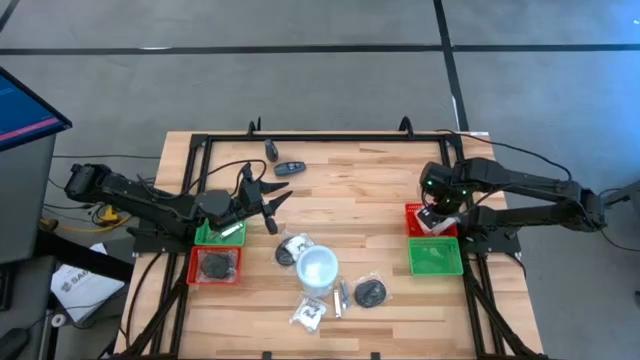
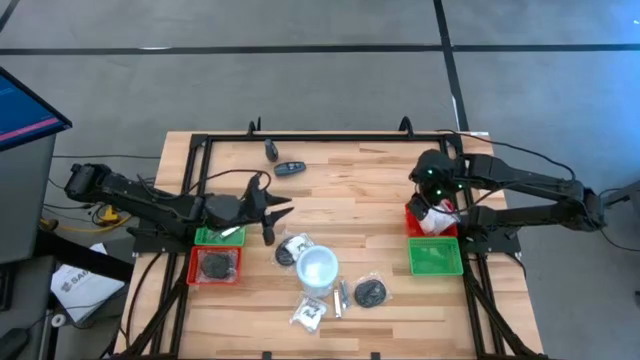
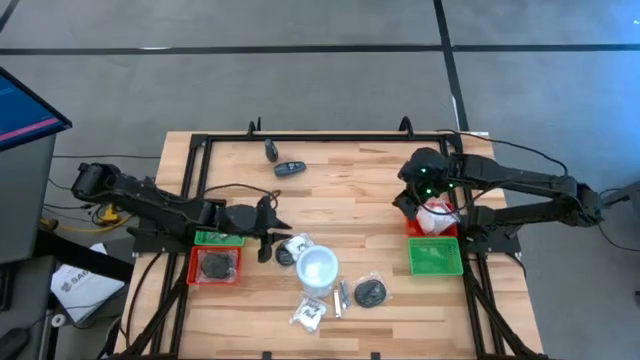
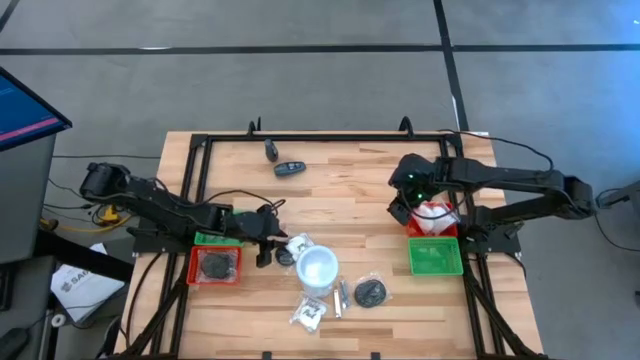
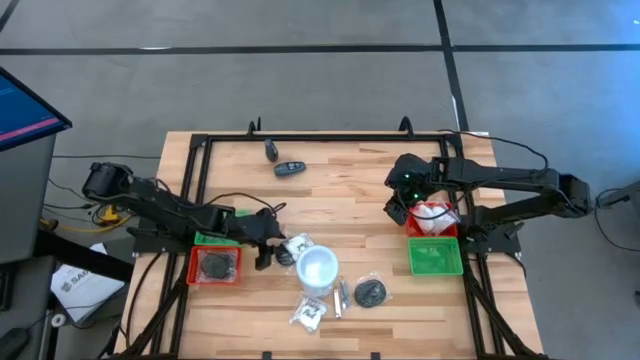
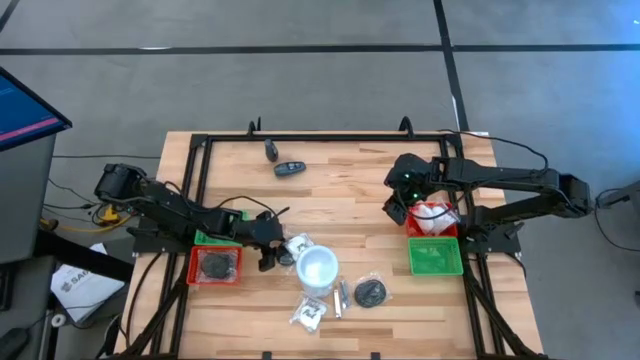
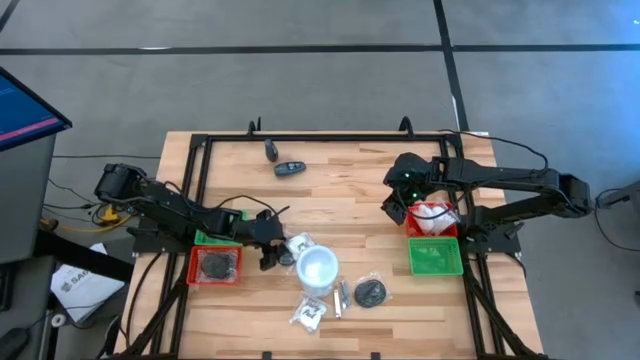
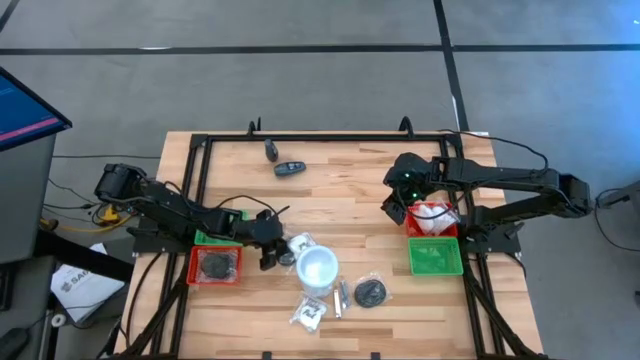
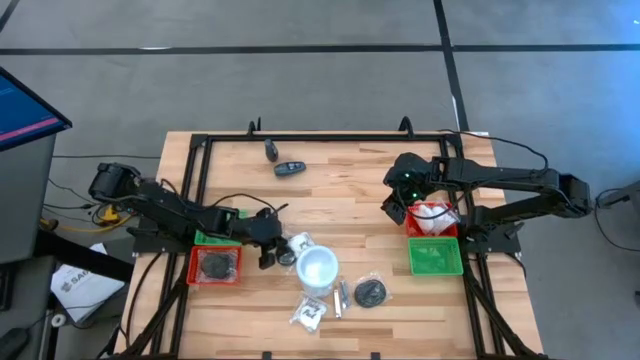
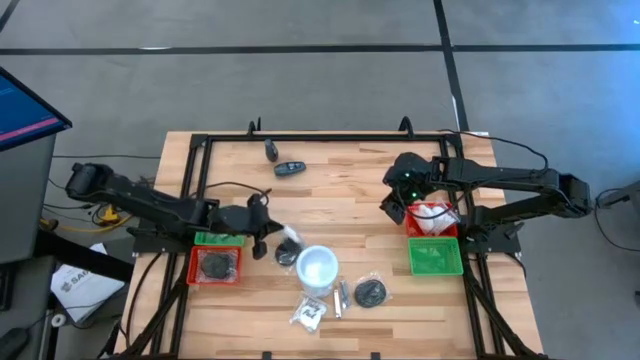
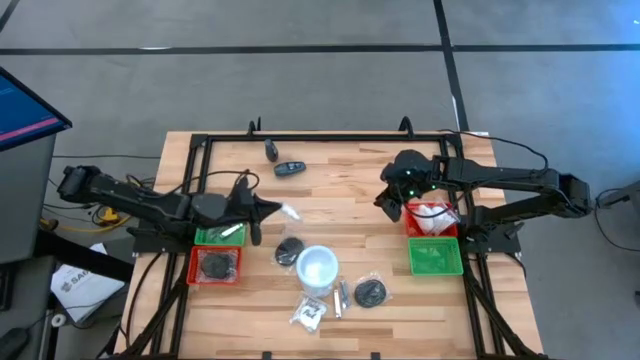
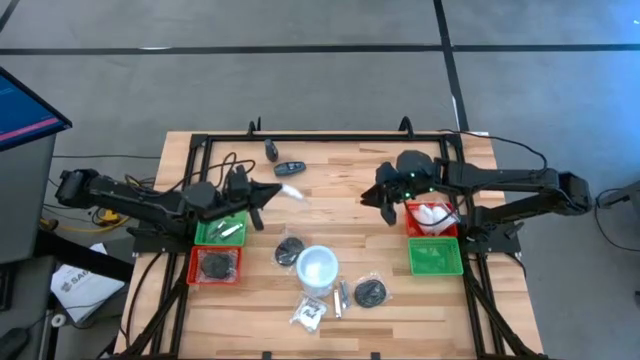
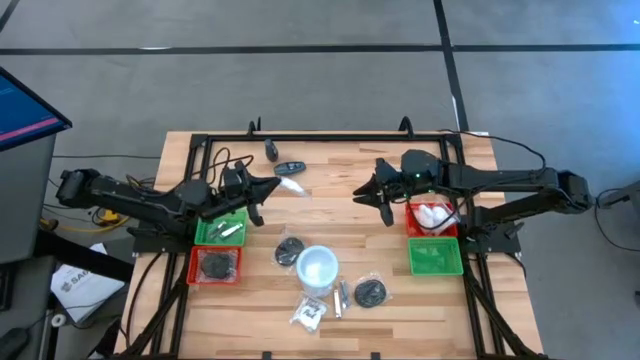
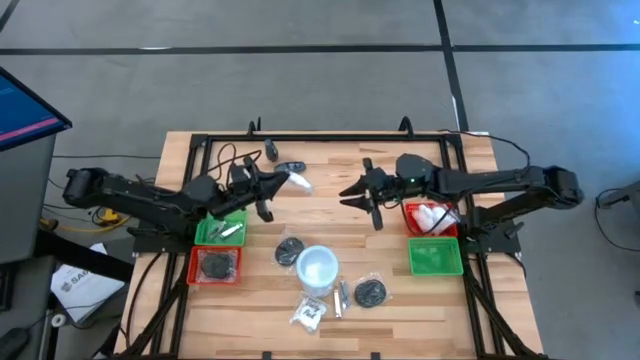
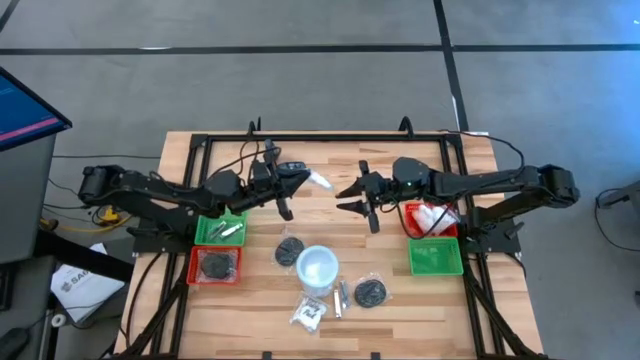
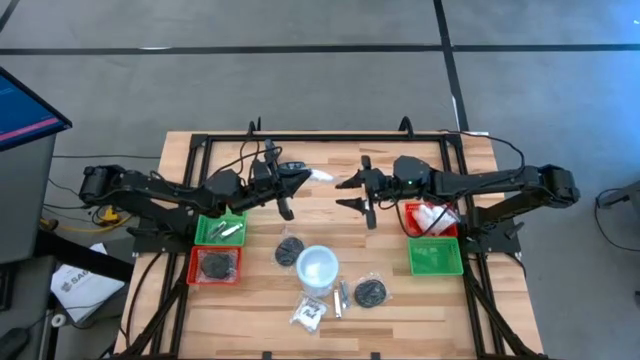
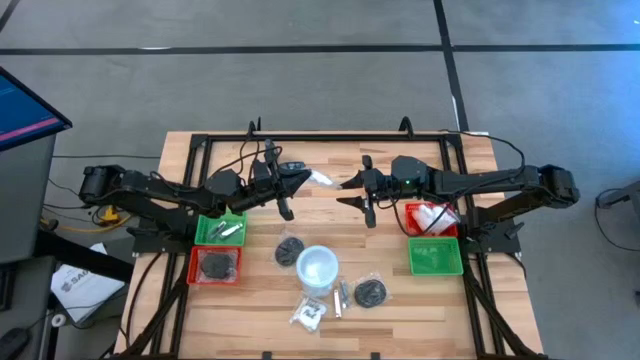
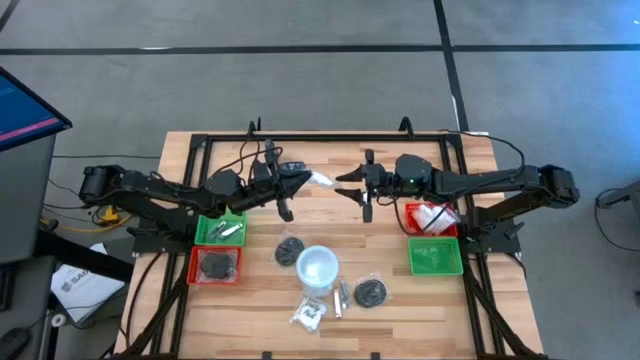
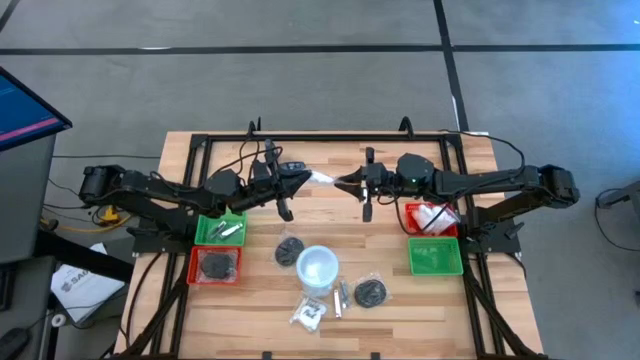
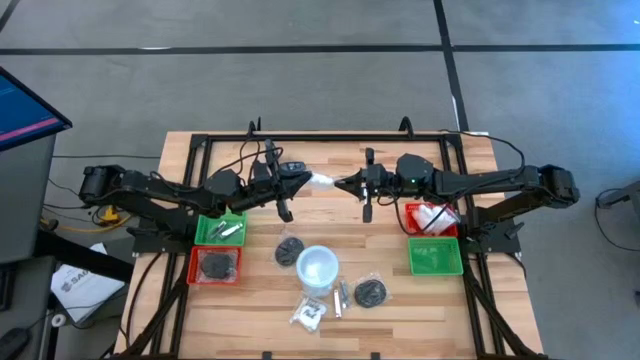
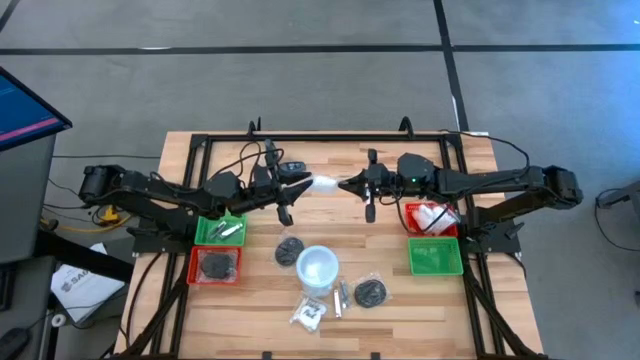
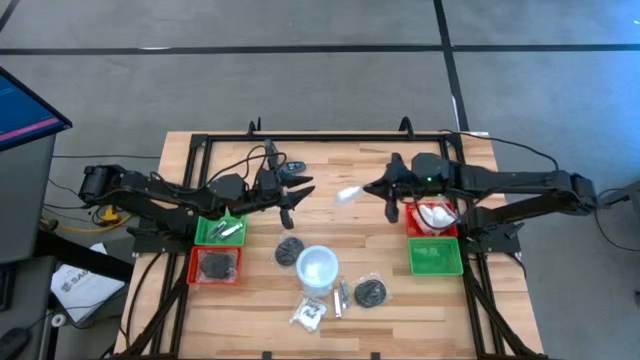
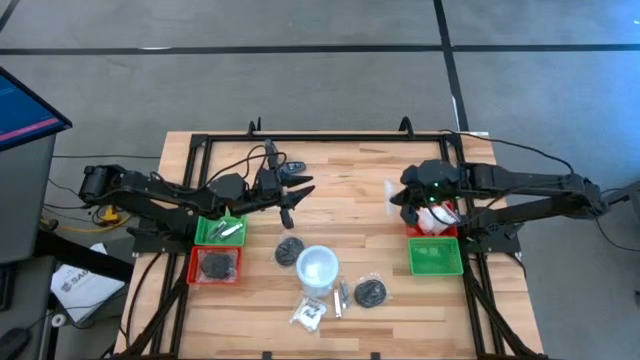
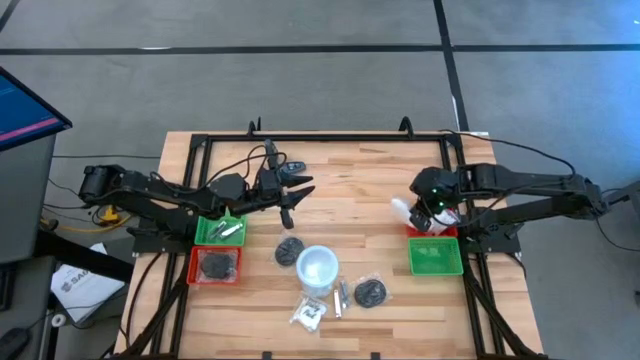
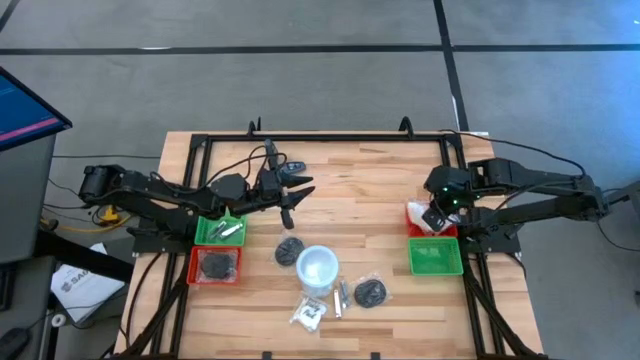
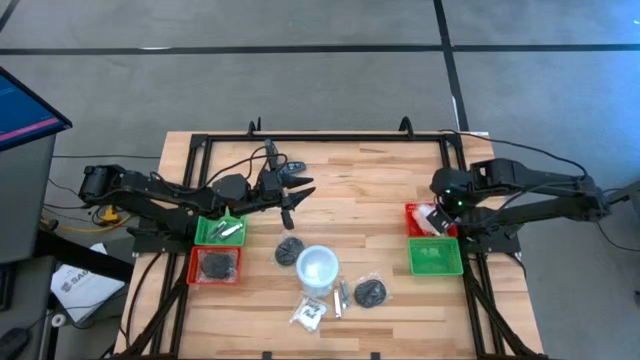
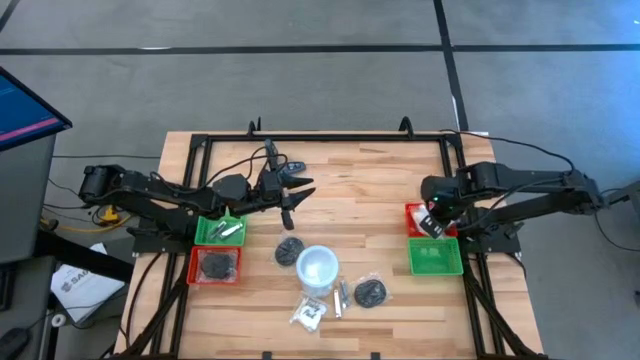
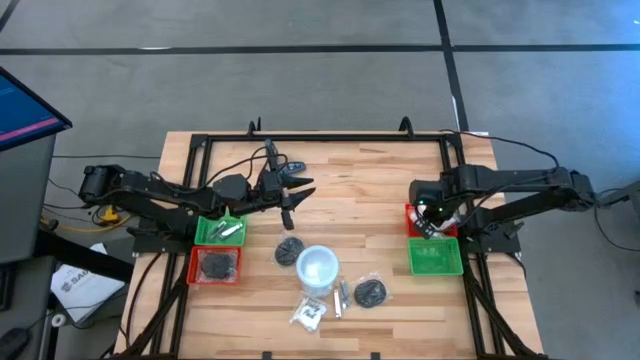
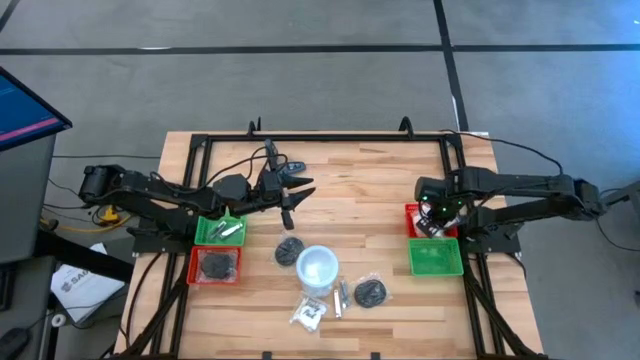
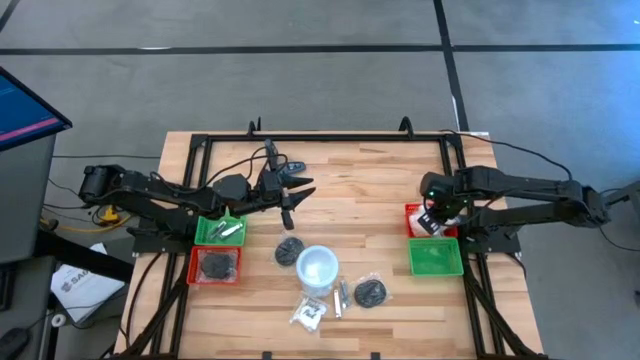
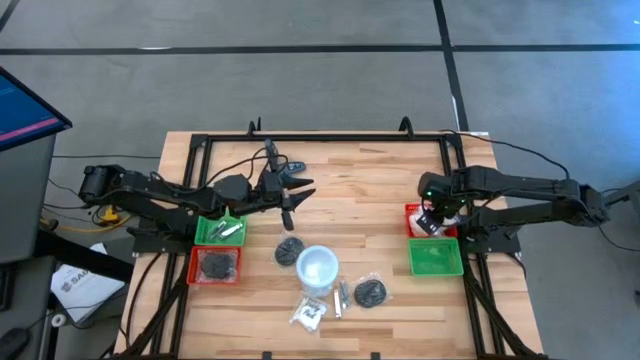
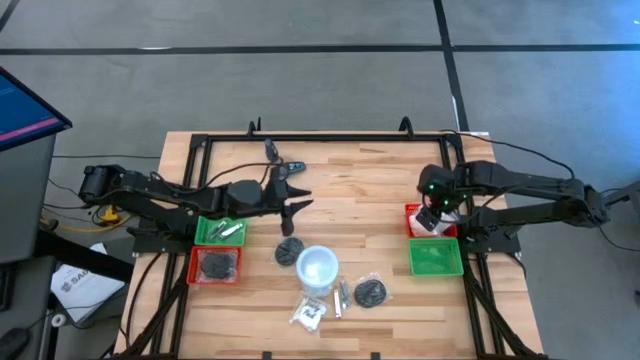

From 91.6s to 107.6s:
Task: Pick & Place Travel size toiletries
Put the white vanity pack into the right red bin

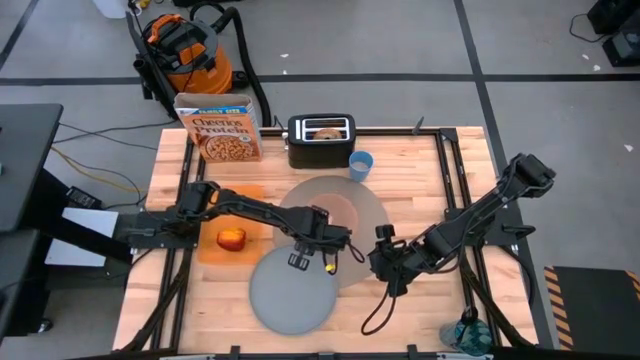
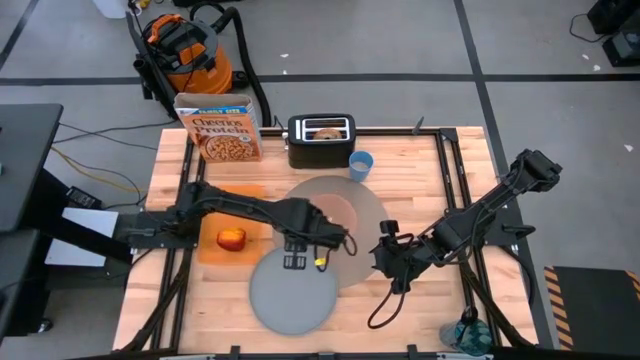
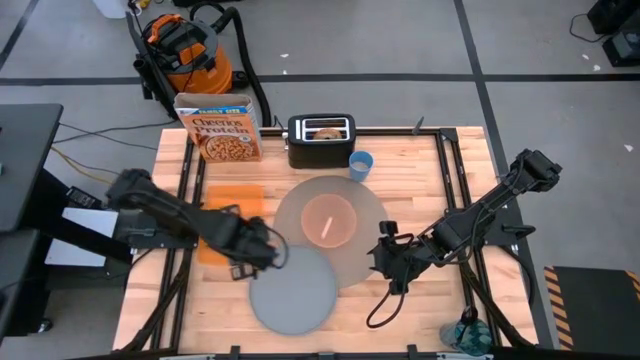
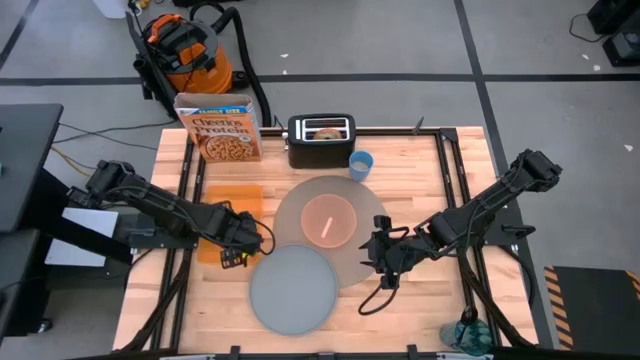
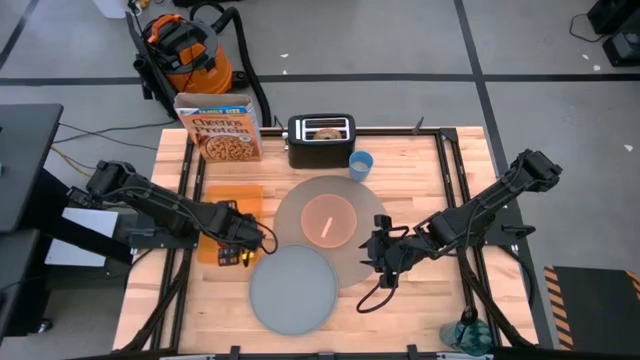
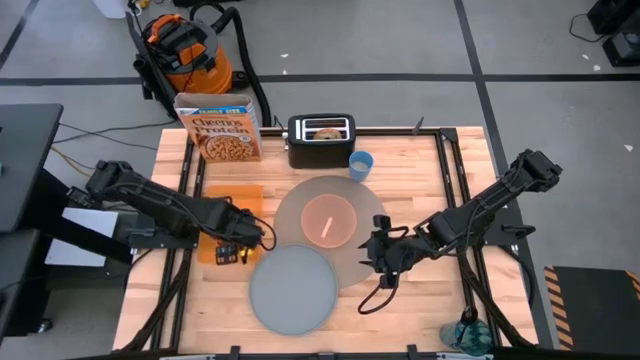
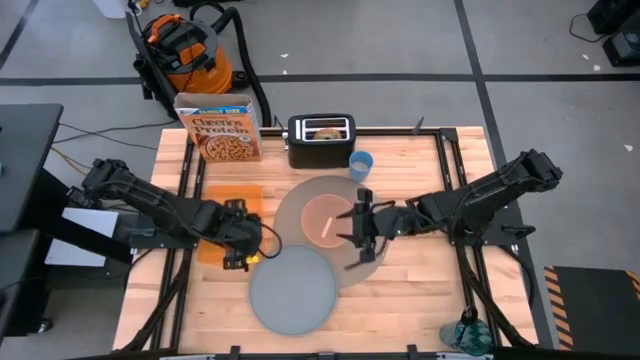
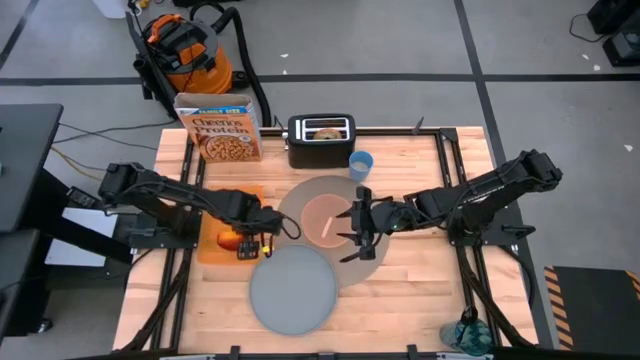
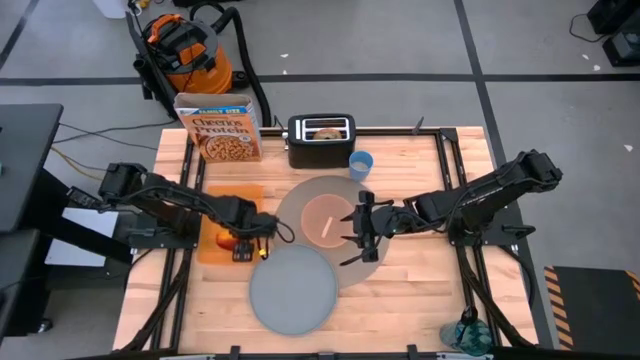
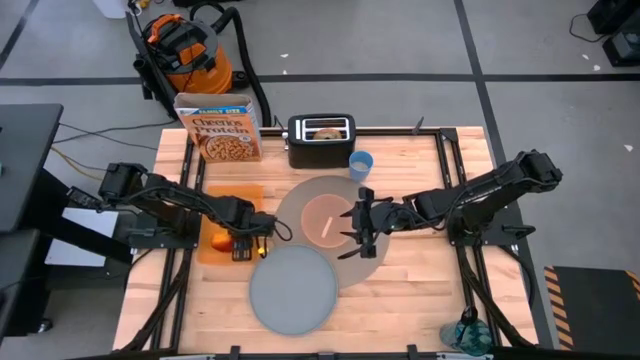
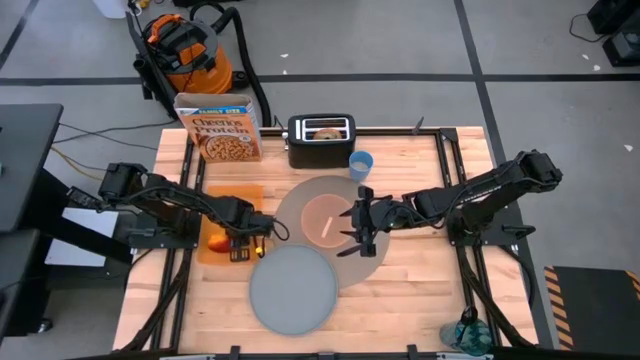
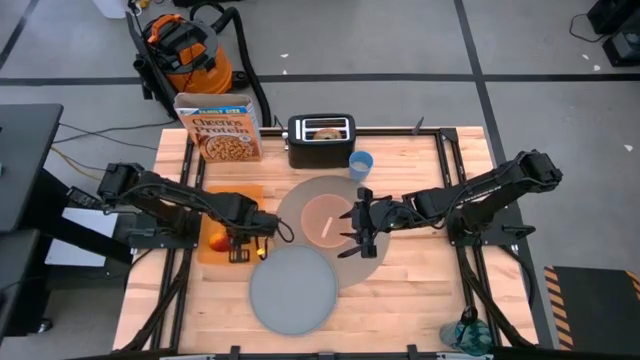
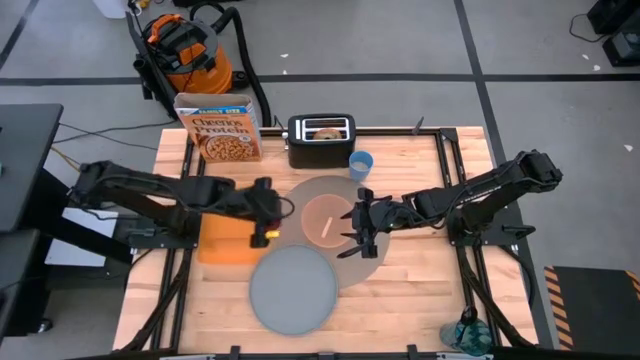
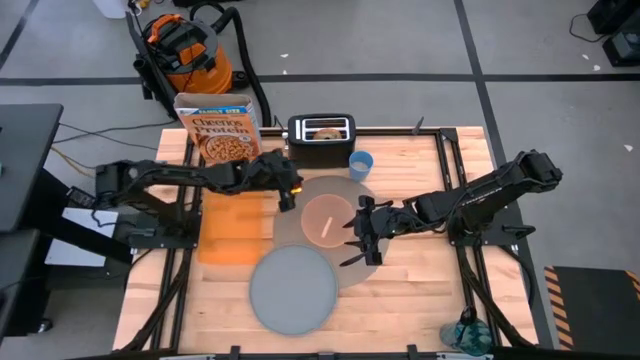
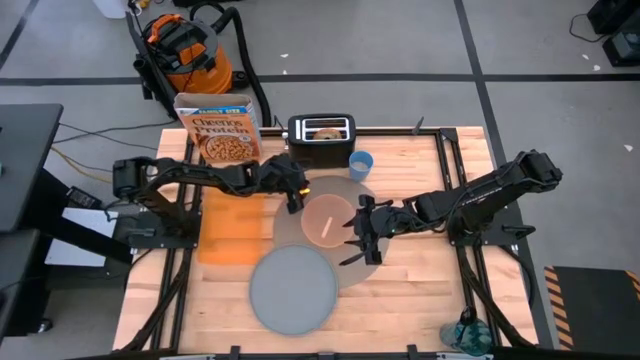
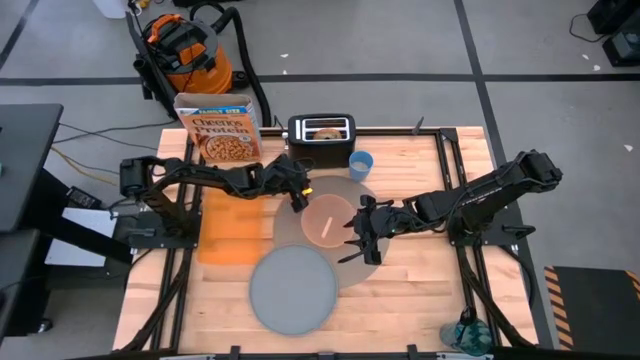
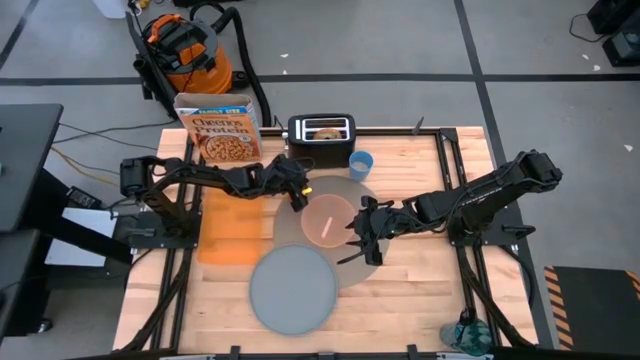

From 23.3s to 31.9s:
Task: Arrange a breakfast setting
Put the apple on the gray table mat to the top left of the orange bowl
